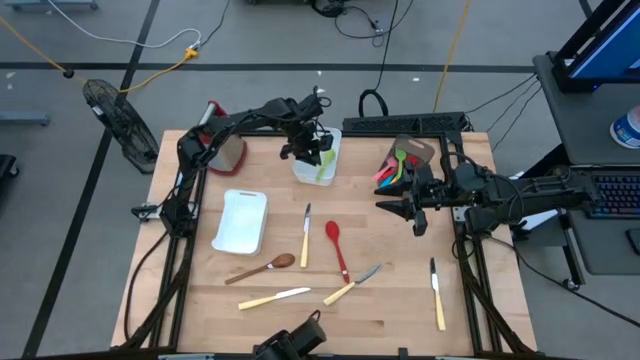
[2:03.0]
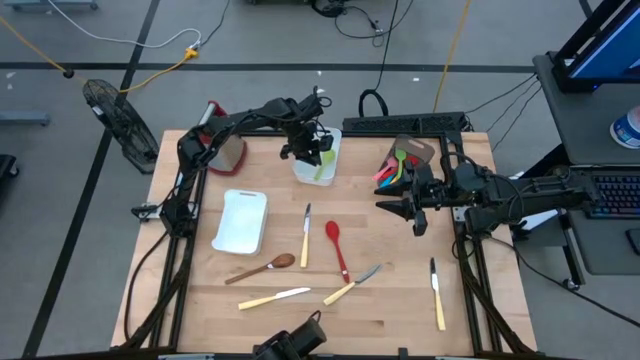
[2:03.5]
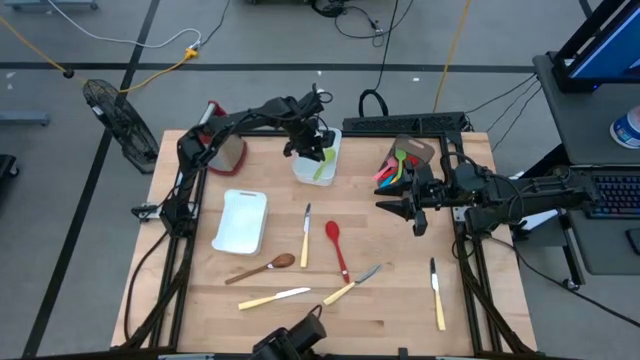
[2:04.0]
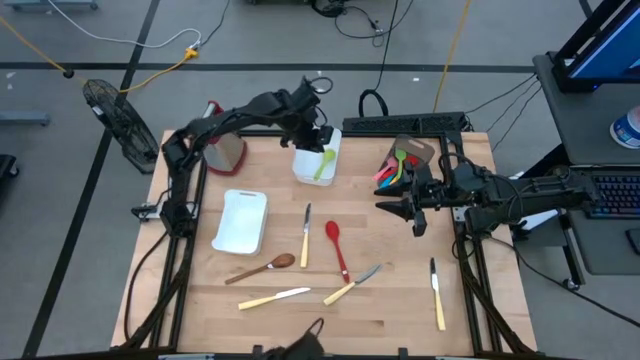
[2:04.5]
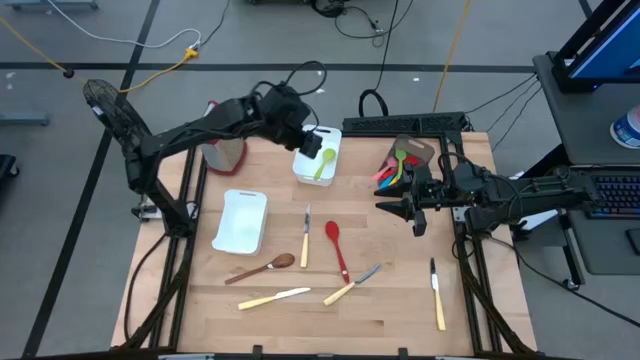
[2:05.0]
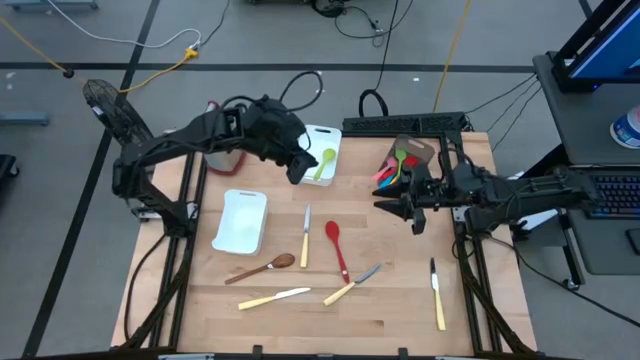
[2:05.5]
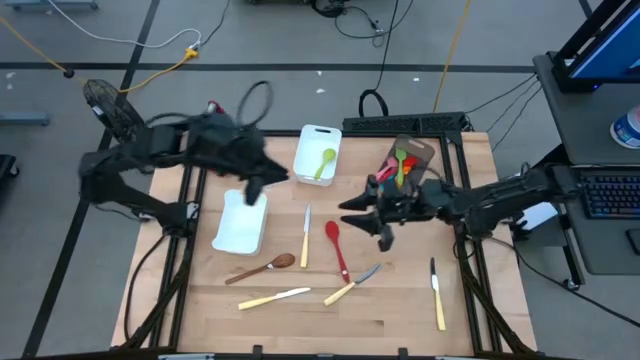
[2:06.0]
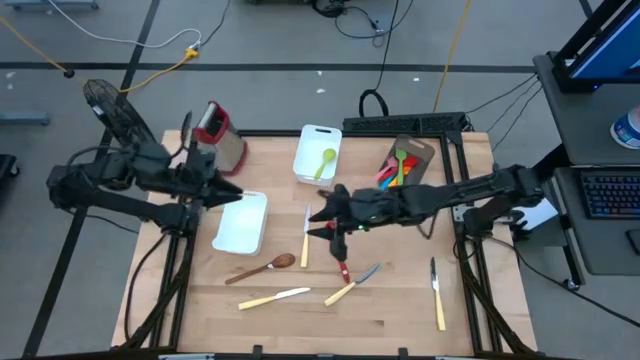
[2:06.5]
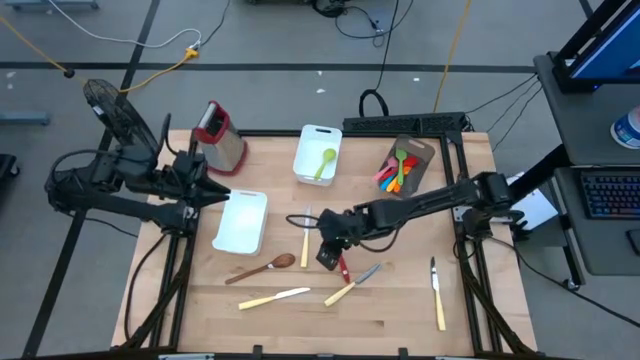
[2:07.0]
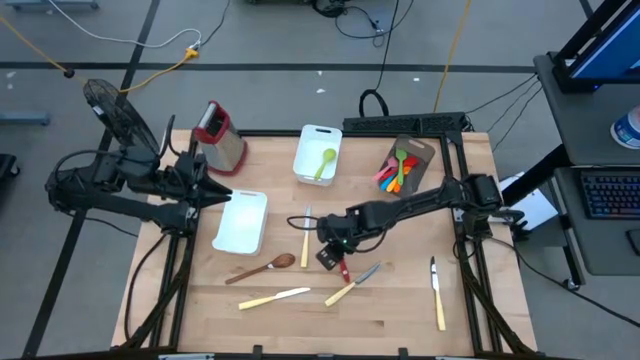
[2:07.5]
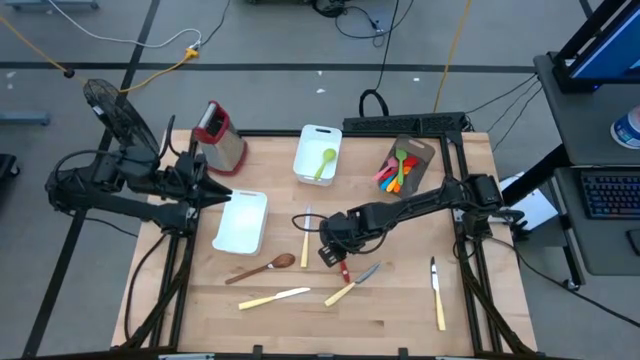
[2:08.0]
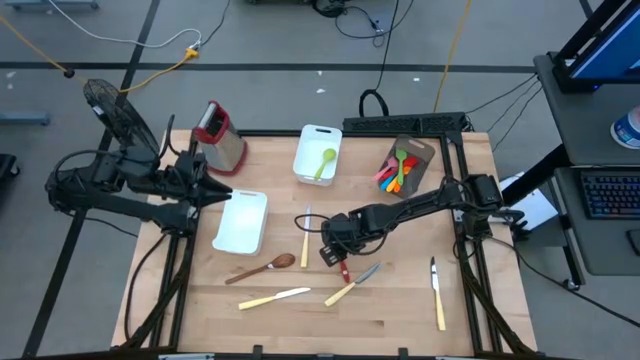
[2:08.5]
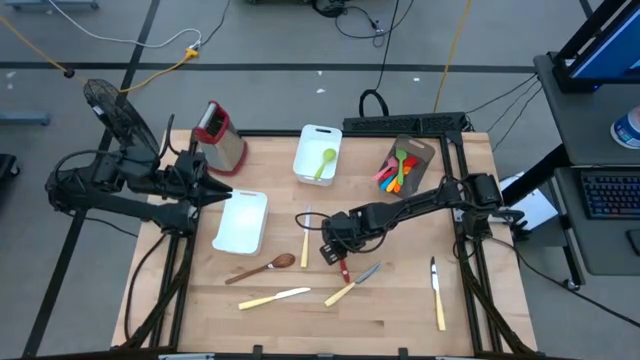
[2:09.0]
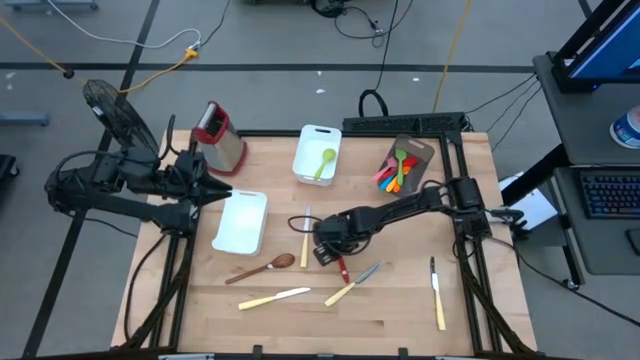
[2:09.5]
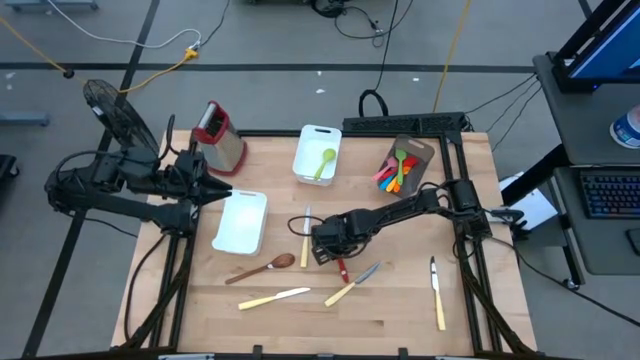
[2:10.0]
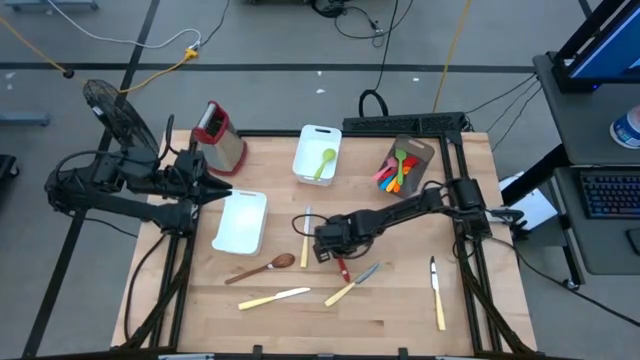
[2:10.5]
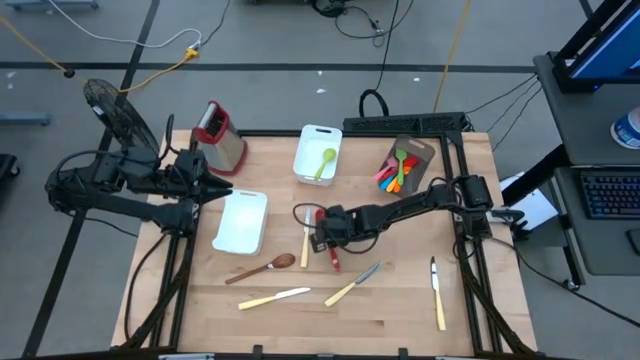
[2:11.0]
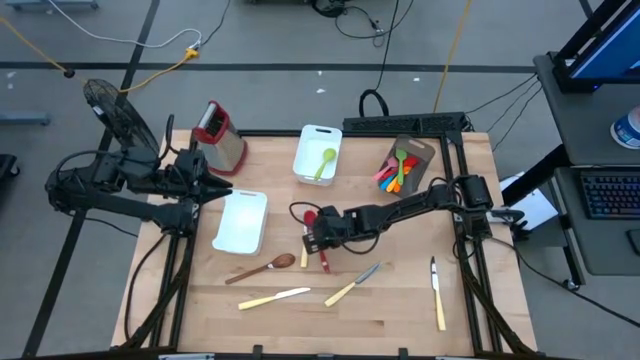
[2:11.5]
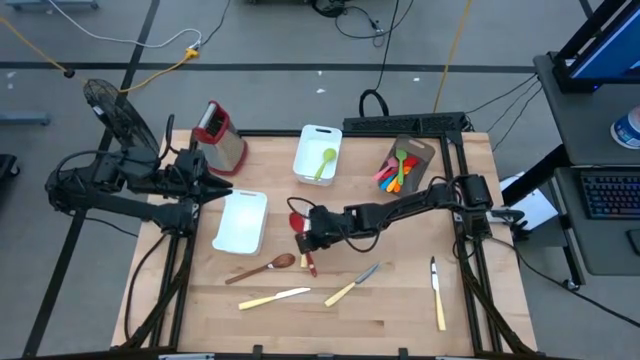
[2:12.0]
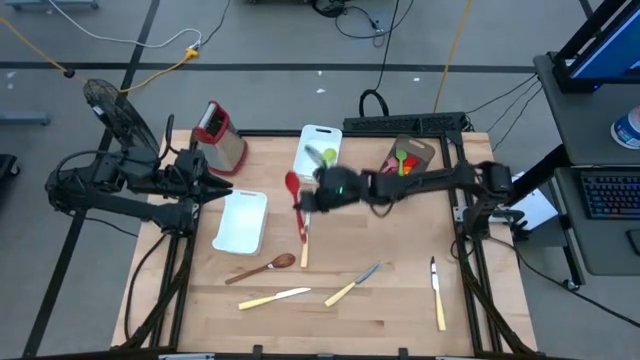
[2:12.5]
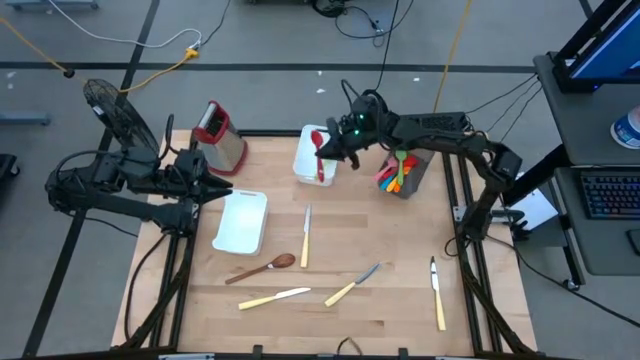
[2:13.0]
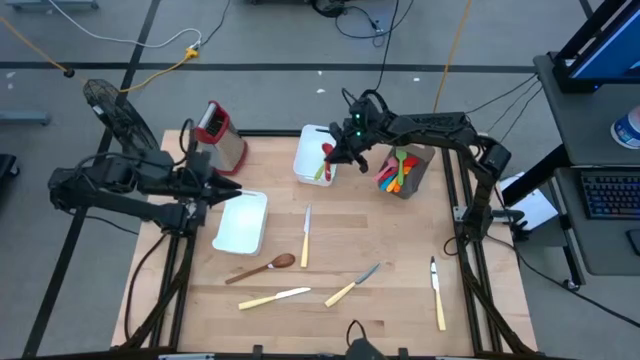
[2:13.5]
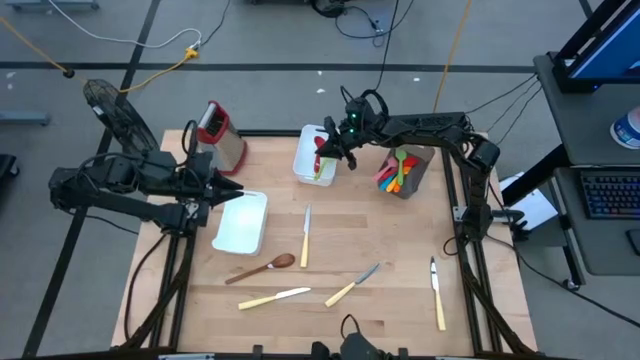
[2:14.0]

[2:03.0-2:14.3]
Task: Pick & Place Kitchen Items
Put the red serving spoon into the top white bin

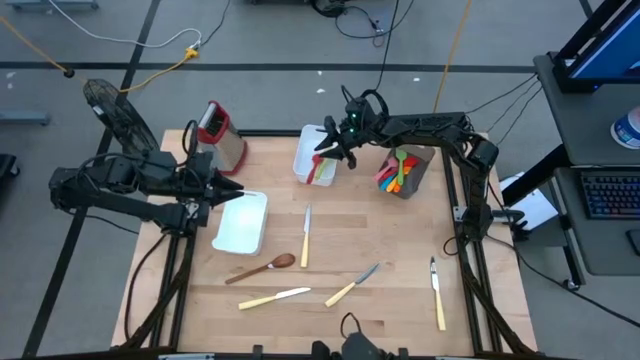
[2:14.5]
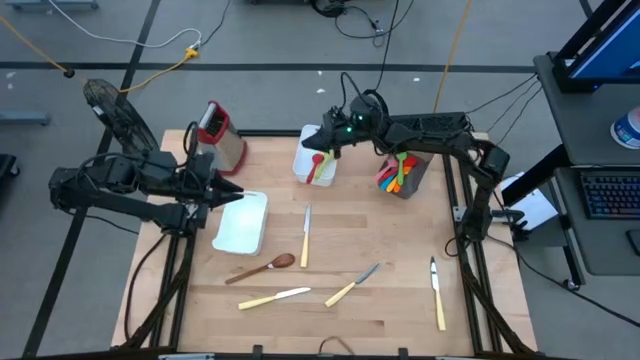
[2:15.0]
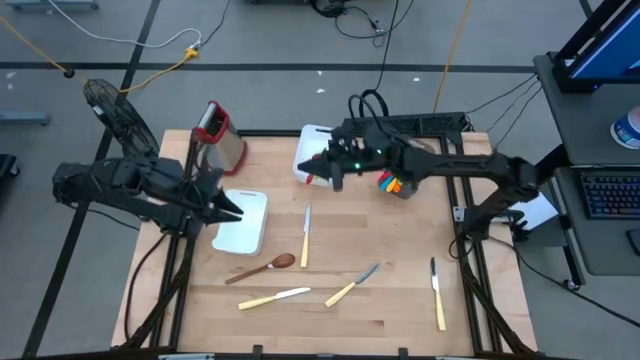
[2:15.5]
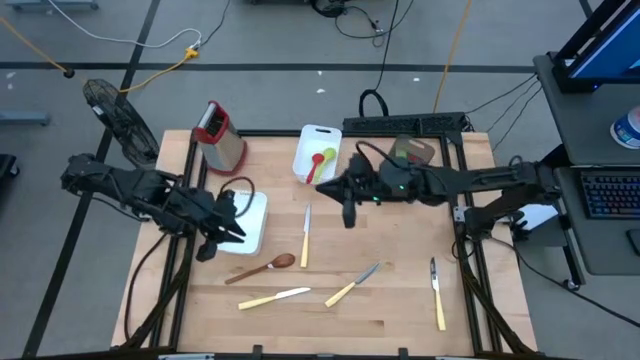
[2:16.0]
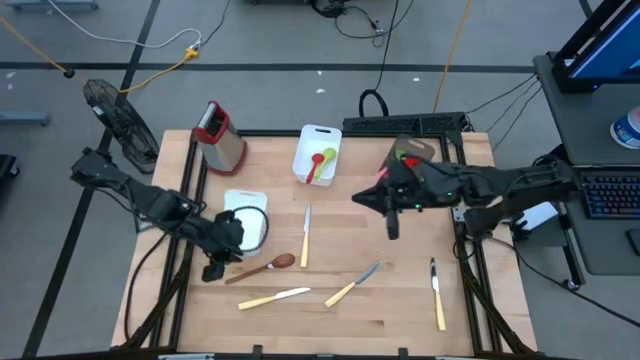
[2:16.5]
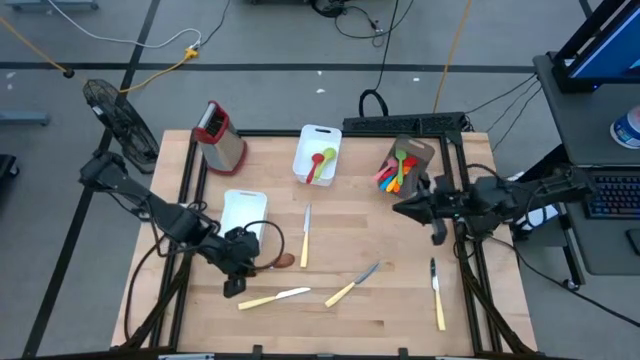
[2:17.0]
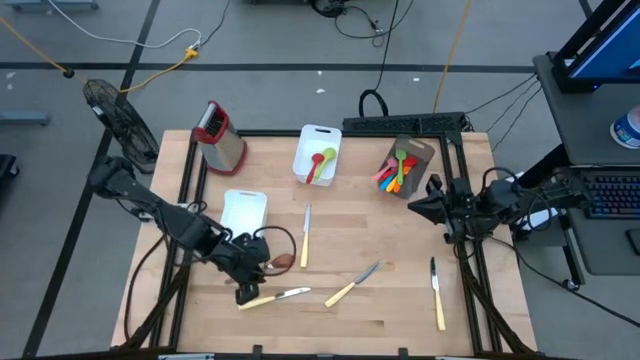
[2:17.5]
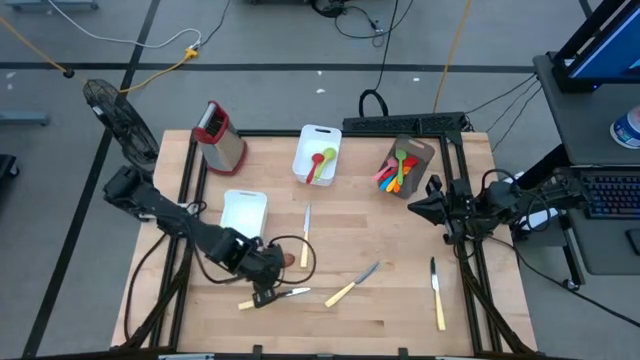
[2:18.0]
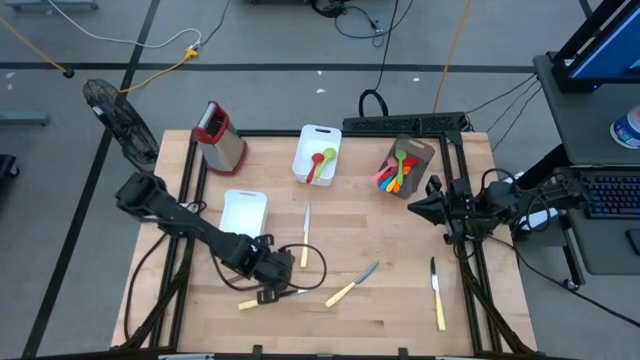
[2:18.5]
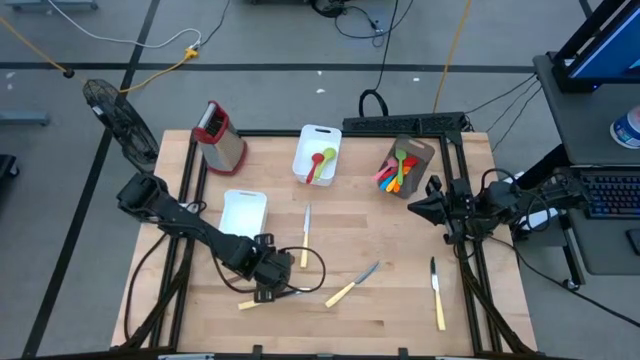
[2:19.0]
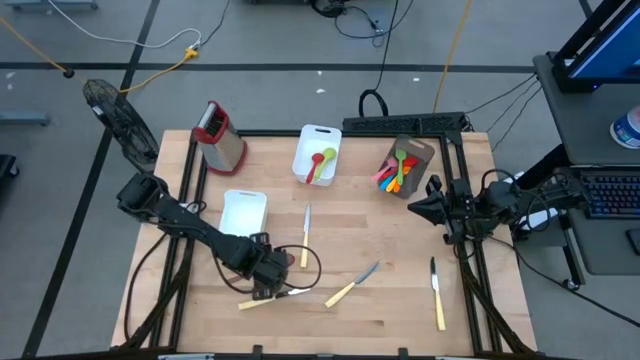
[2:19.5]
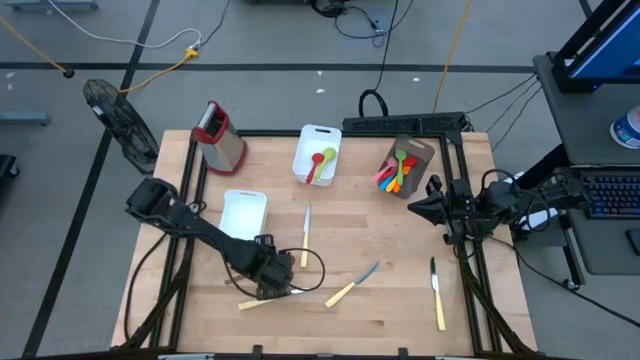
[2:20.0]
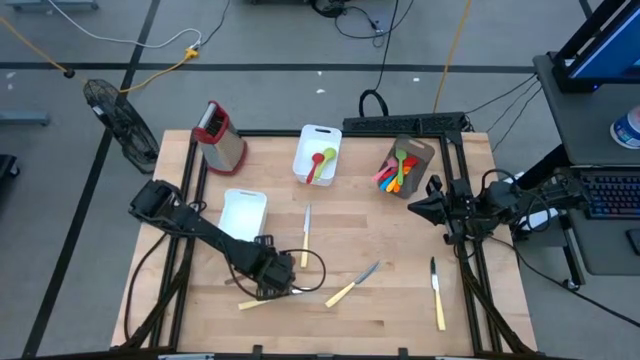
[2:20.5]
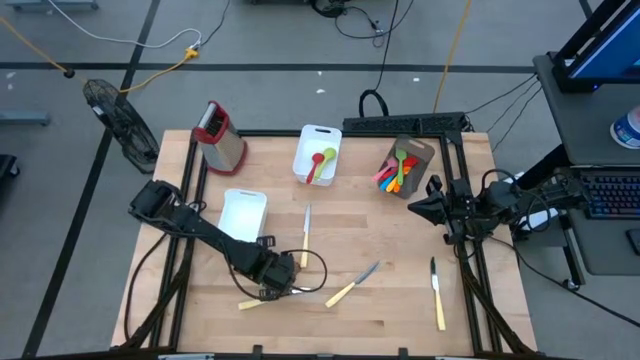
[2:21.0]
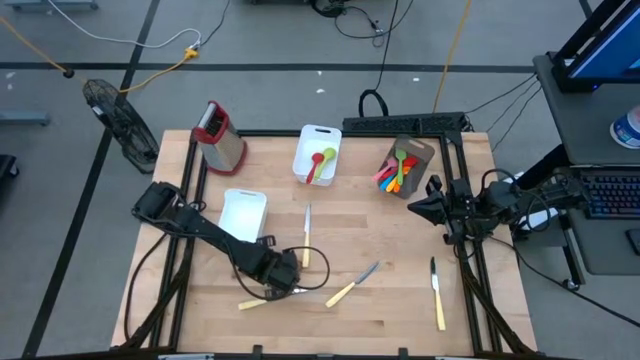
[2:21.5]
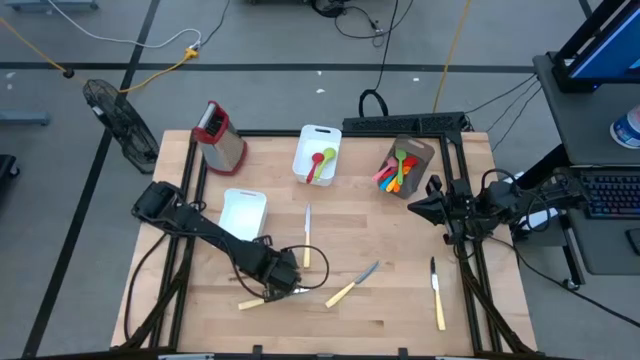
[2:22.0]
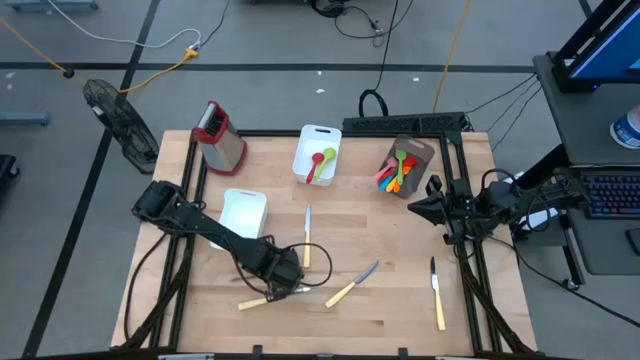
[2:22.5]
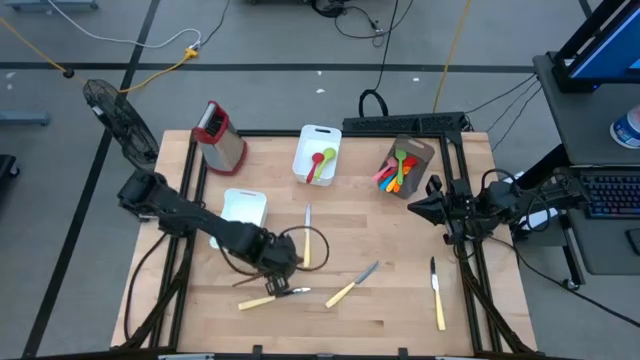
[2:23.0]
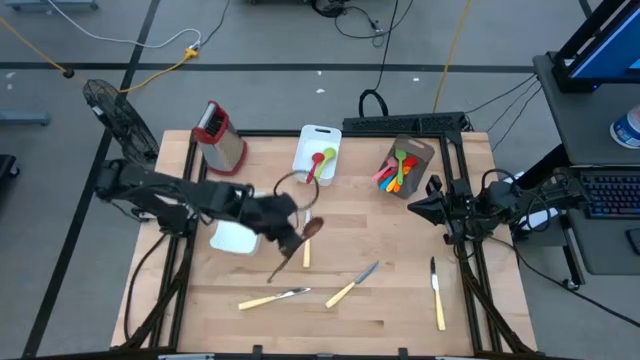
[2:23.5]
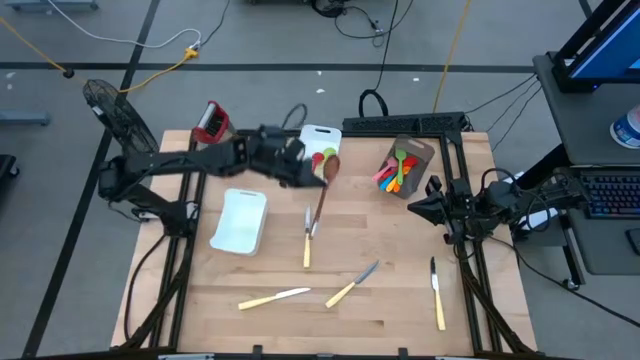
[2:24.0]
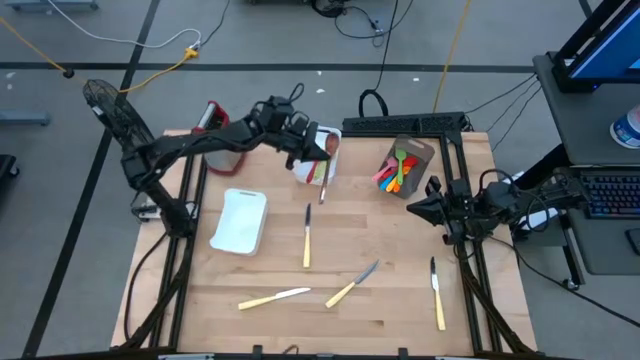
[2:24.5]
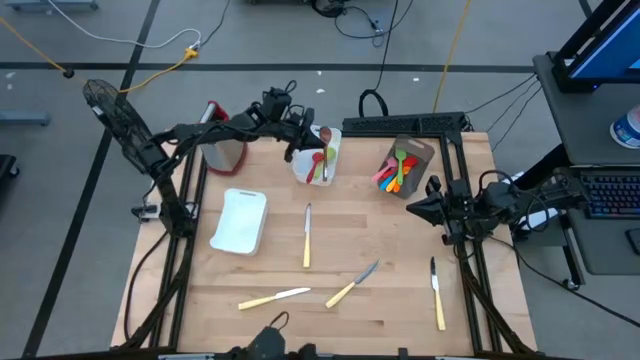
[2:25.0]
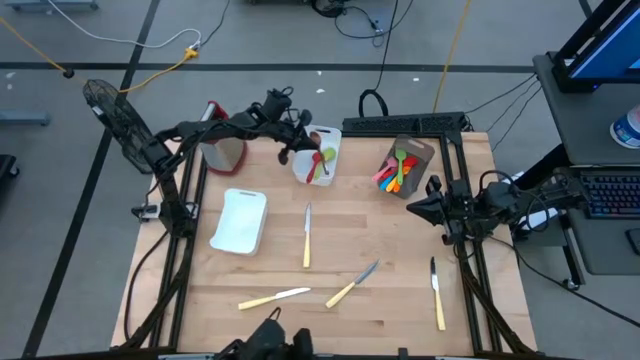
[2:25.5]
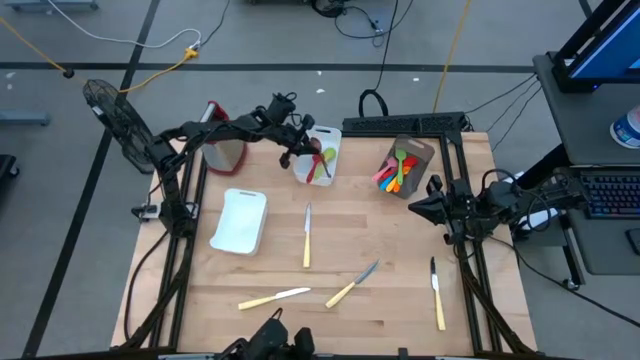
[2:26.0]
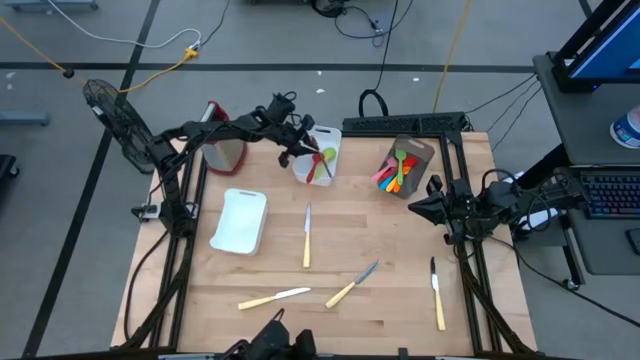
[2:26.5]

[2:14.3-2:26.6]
Put the brown serving spoon into the top white bin
